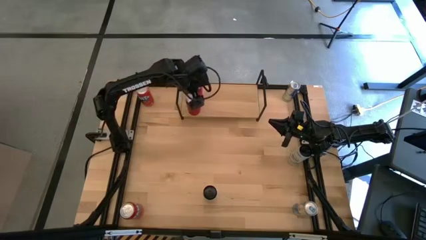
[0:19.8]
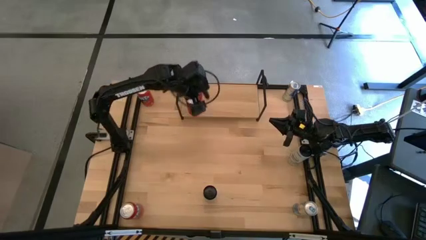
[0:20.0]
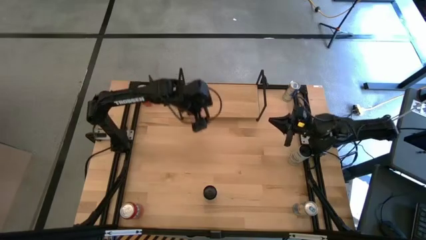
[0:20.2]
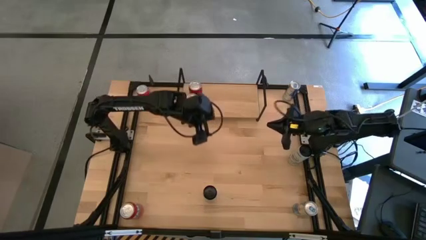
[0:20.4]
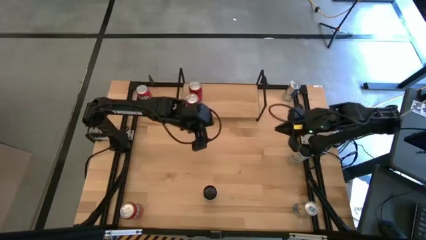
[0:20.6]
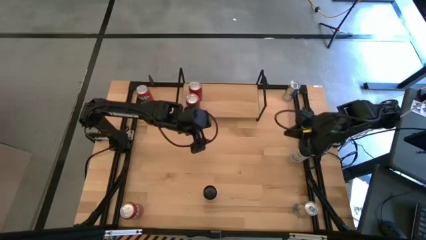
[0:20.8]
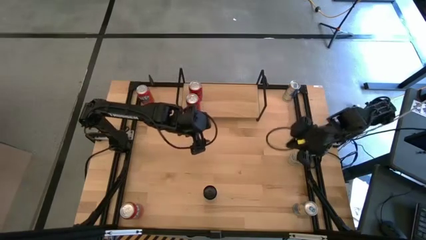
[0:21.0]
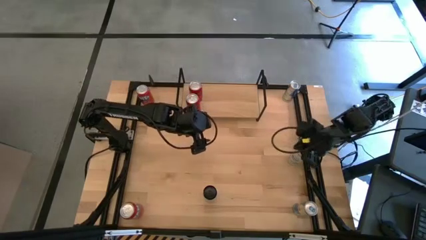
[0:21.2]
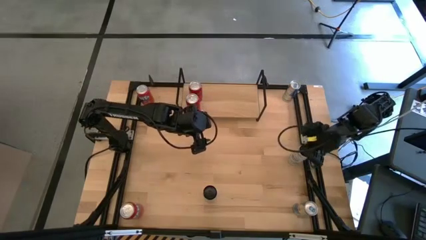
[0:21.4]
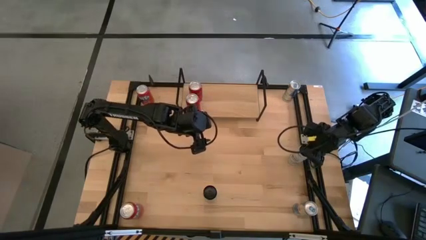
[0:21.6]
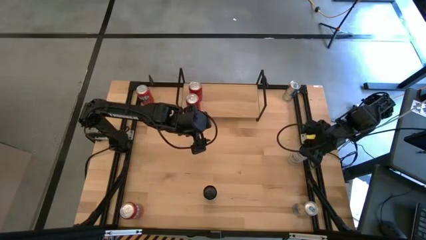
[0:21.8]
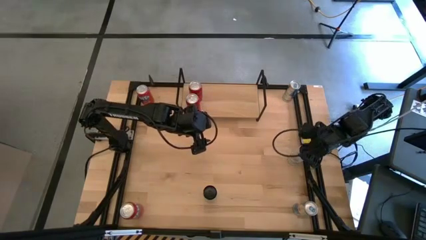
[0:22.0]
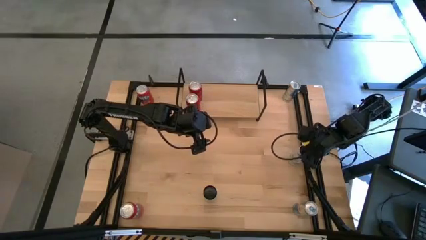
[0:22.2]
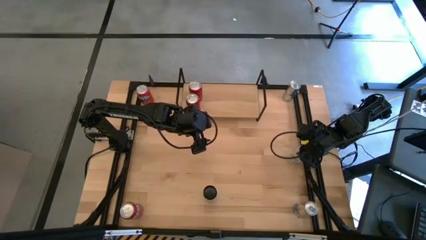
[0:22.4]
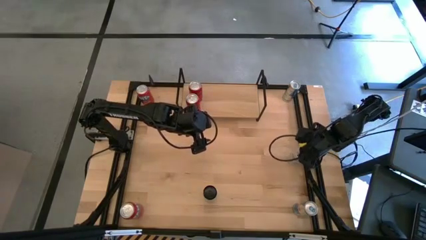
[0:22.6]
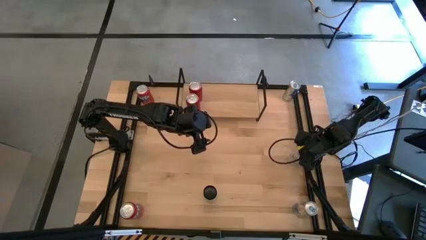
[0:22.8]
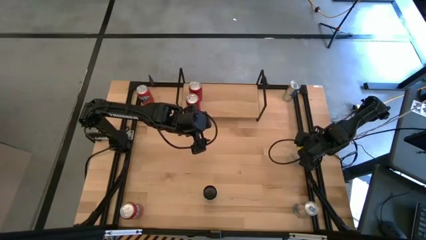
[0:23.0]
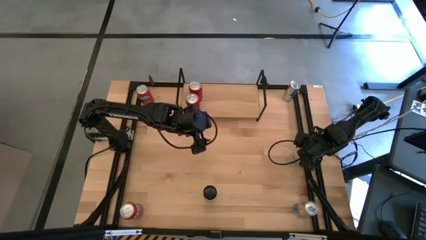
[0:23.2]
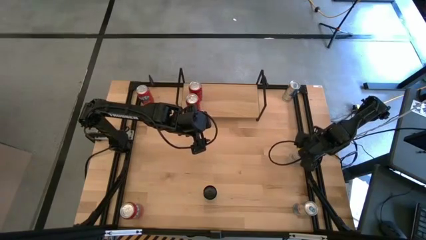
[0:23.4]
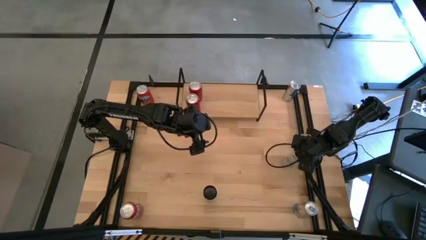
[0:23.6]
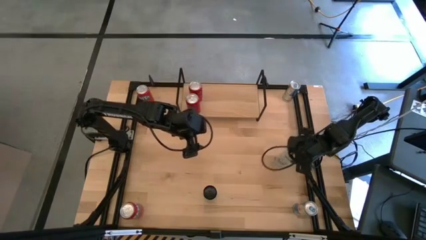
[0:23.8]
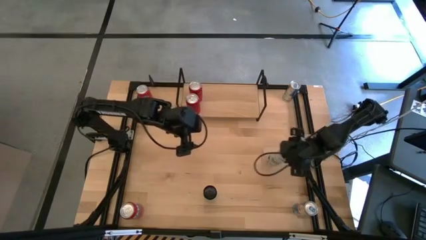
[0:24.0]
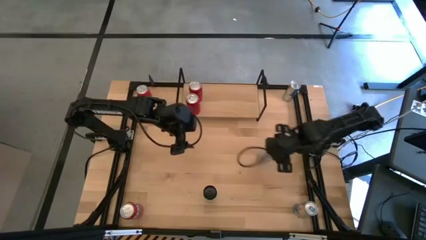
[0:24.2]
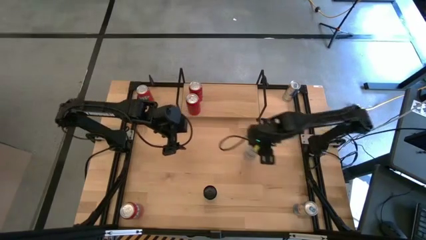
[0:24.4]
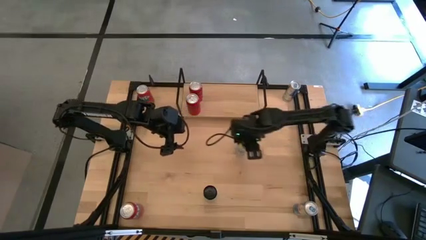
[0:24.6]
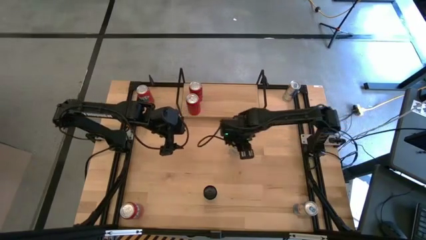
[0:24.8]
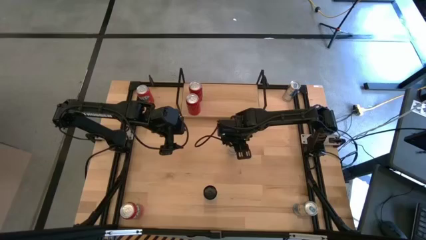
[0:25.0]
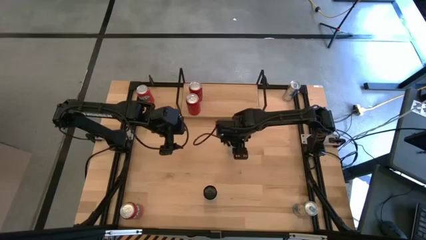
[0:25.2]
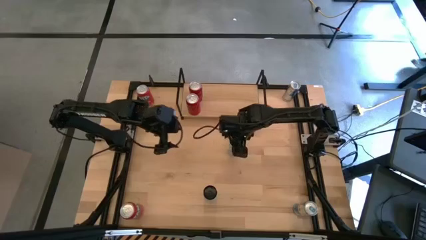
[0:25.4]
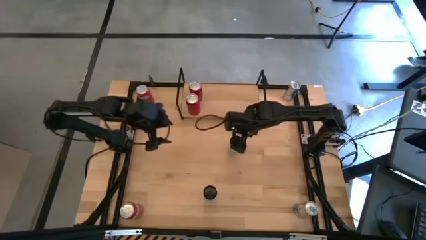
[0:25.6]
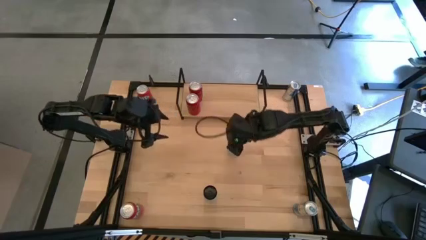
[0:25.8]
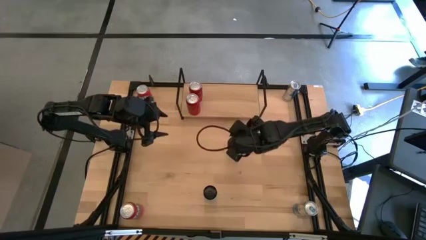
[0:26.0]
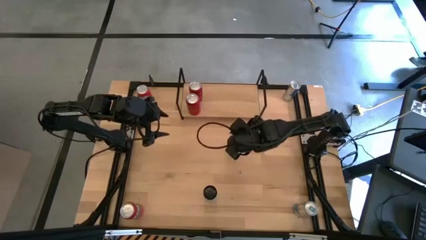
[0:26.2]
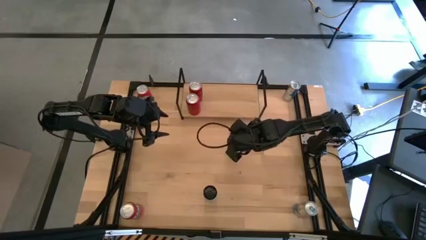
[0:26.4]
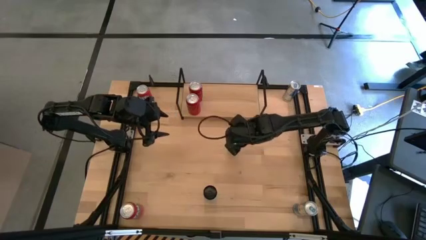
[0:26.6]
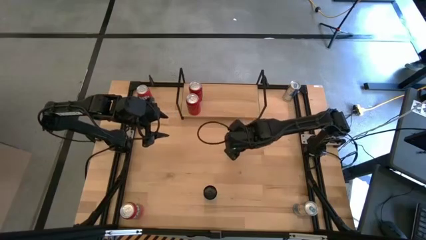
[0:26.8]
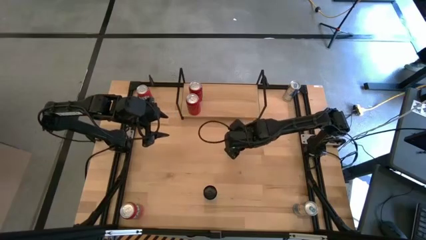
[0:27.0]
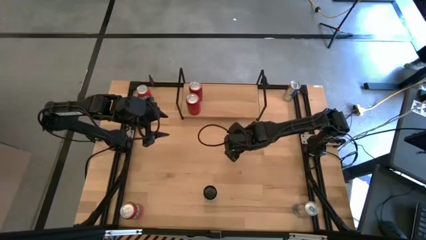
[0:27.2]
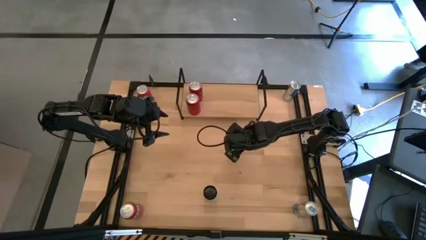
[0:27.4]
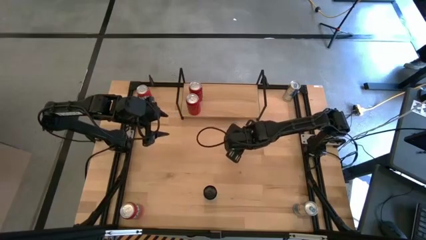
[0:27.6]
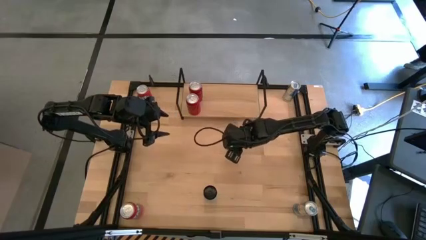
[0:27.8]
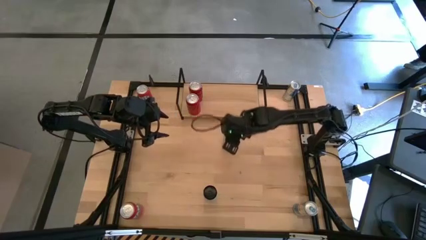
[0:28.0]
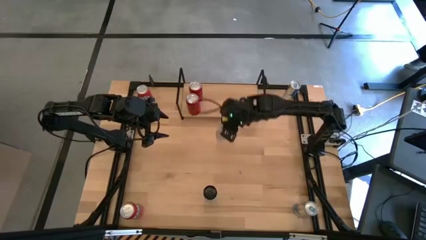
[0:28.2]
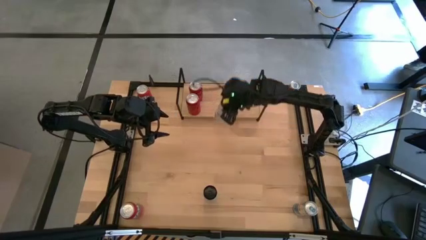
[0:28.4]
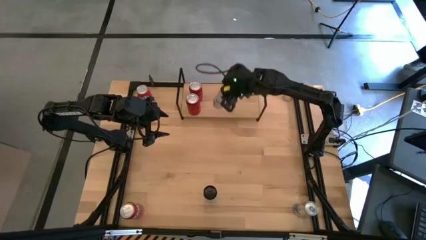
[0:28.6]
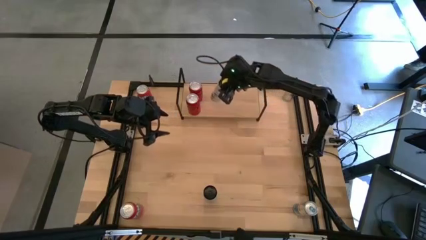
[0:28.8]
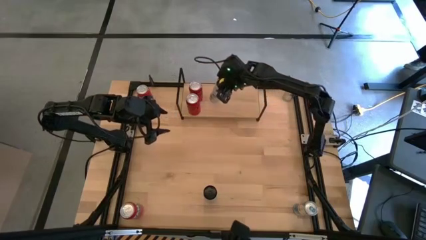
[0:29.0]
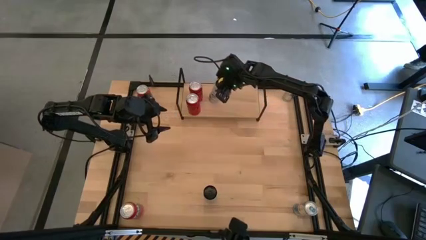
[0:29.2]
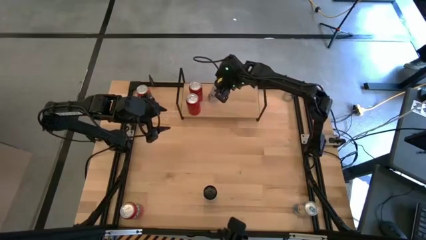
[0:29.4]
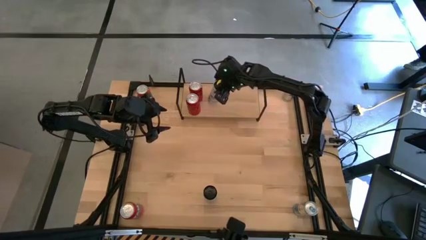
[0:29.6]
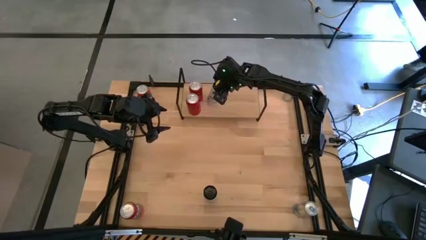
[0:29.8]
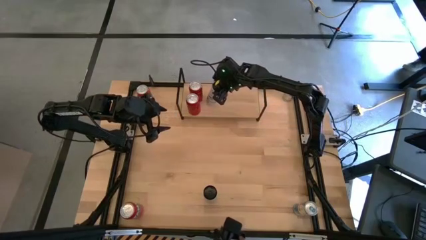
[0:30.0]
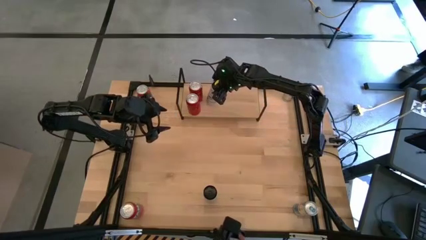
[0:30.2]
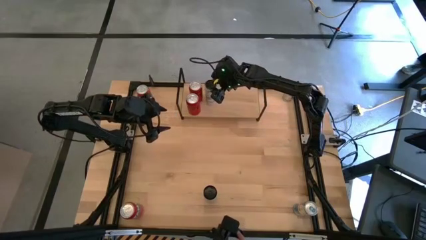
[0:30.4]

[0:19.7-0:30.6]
Task: Place canned beverage on shelf
Put the right white and blue soda can on the shelf

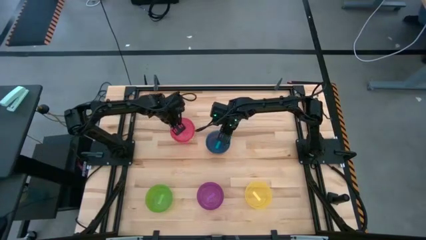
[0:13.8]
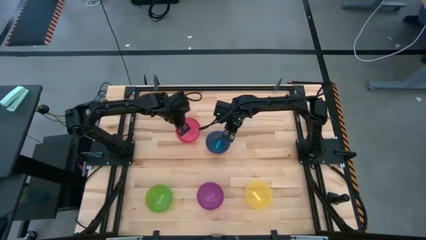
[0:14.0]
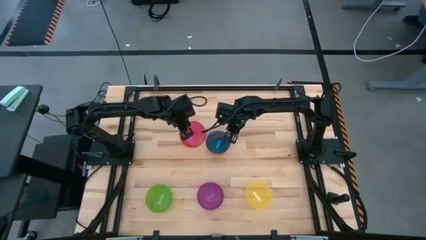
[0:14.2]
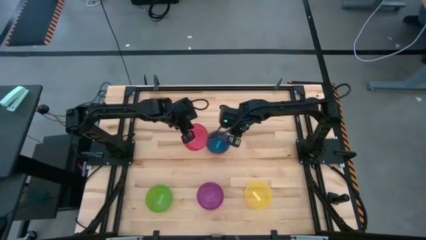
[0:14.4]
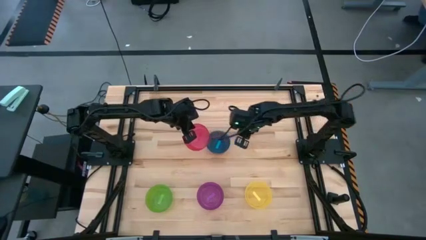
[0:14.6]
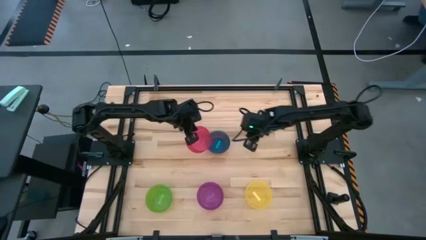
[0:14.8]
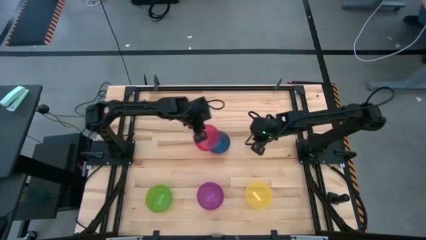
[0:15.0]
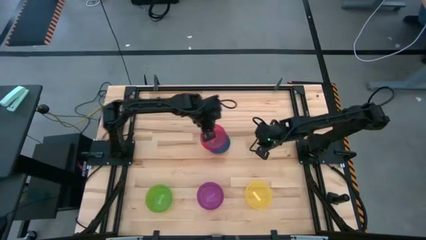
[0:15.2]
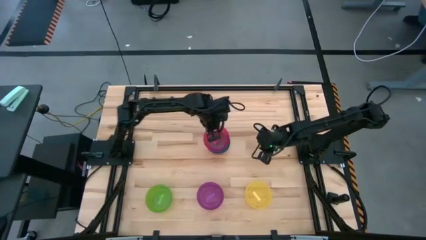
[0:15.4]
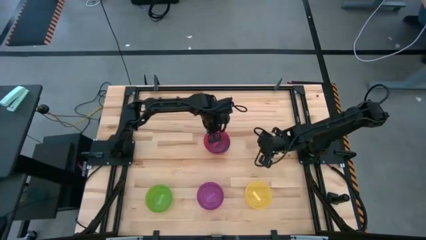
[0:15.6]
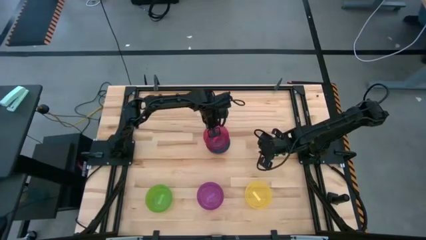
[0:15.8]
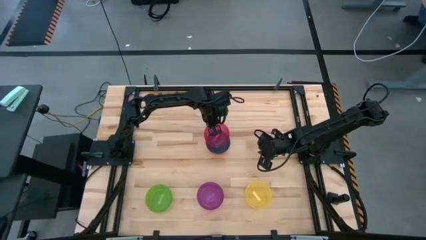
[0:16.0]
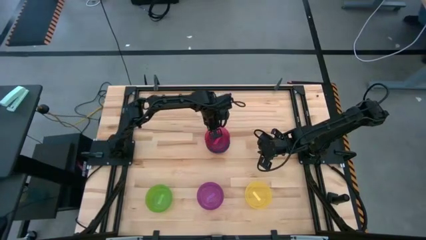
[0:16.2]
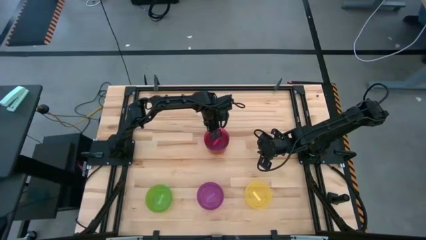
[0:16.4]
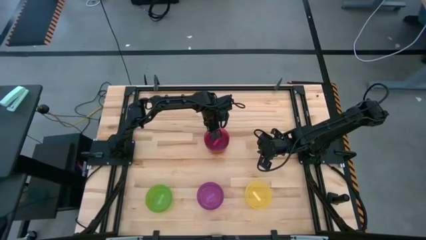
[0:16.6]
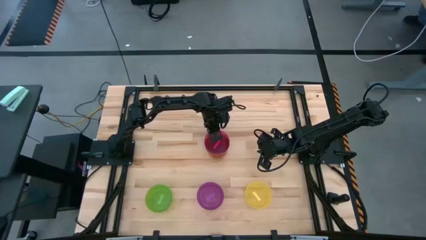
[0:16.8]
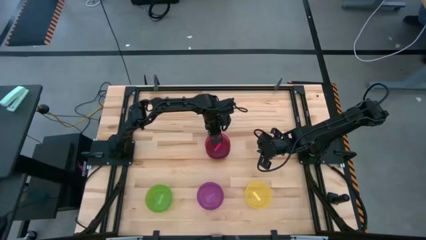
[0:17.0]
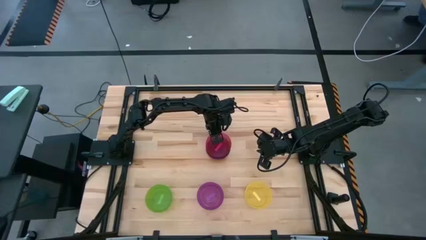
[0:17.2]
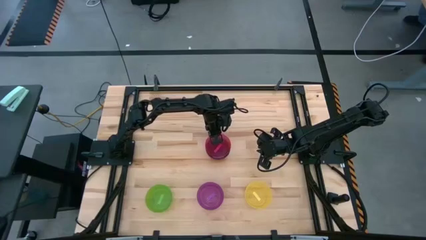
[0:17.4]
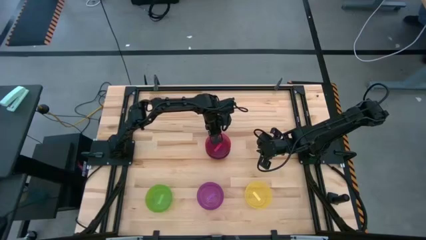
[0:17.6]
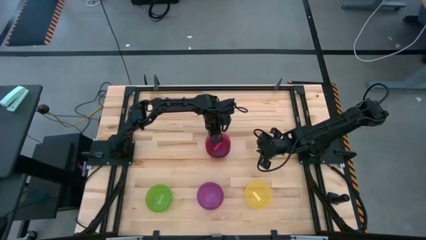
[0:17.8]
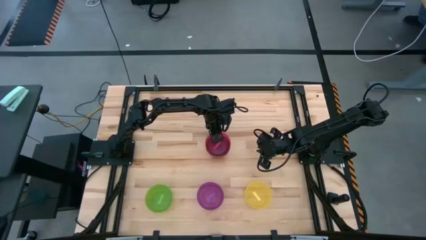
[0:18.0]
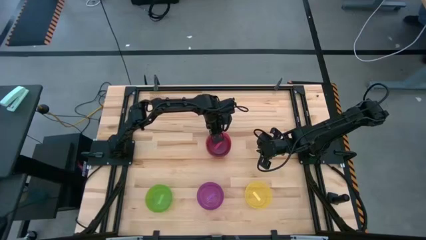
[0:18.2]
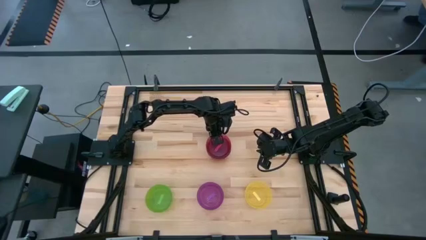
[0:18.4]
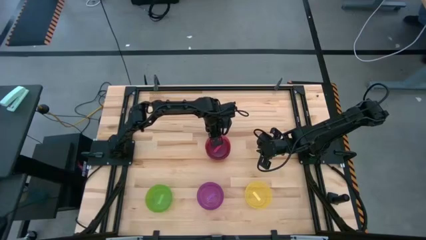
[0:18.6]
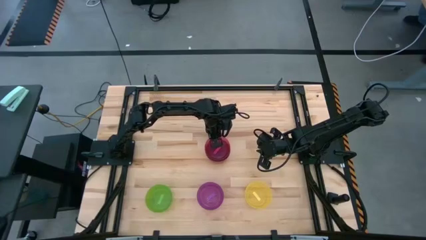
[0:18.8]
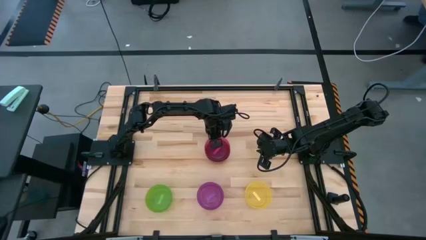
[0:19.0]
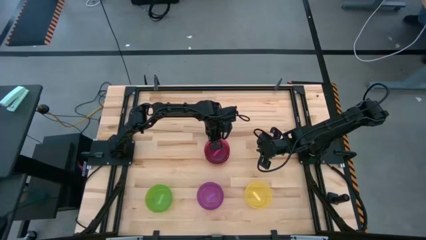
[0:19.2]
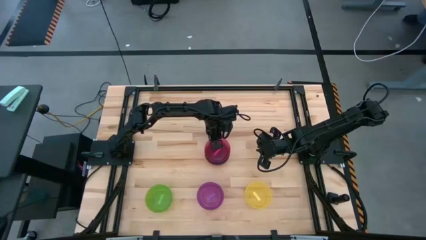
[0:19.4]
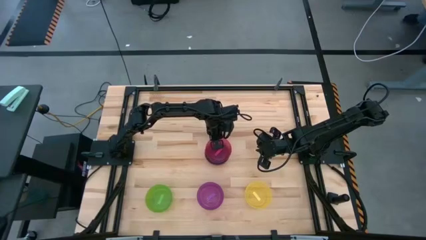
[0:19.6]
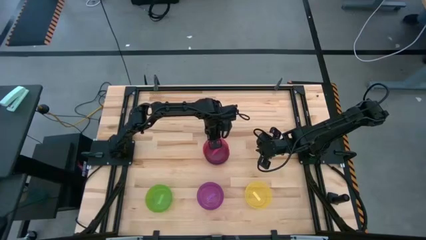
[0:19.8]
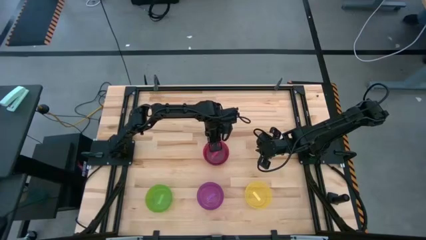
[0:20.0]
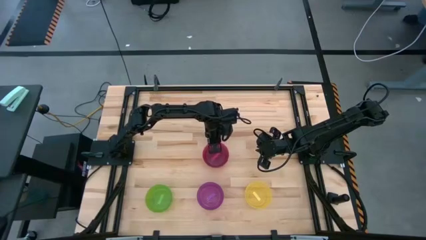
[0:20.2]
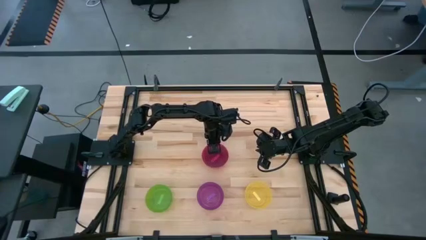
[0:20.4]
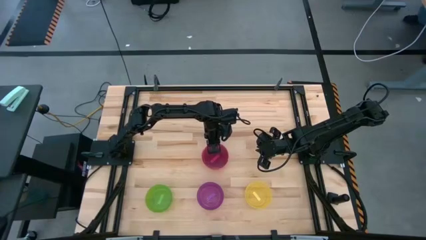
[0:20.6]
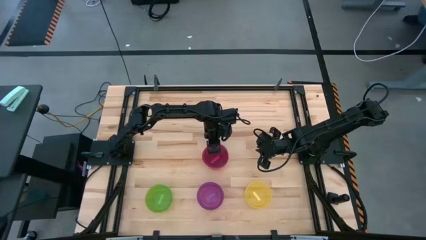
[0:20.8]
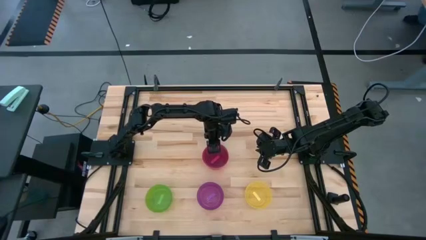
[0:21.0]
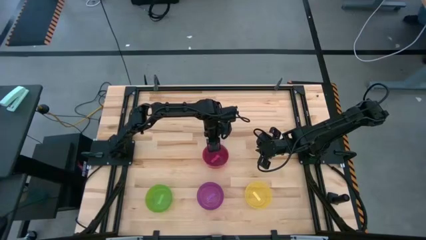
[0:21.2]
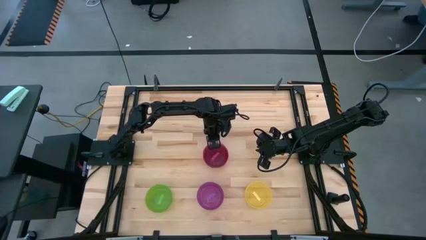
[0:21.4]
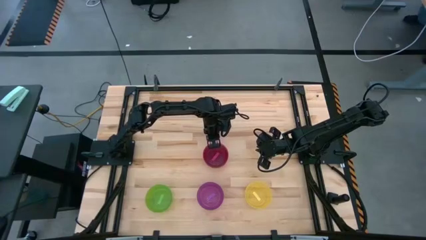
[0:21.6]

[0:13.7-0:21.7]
Task: Nest bowls inside each other
Stack the red bowl on top of the blue bowl
